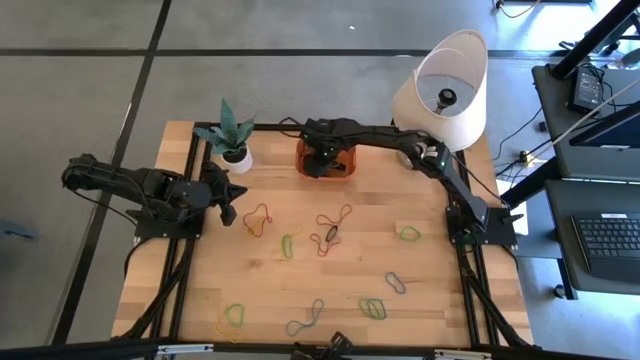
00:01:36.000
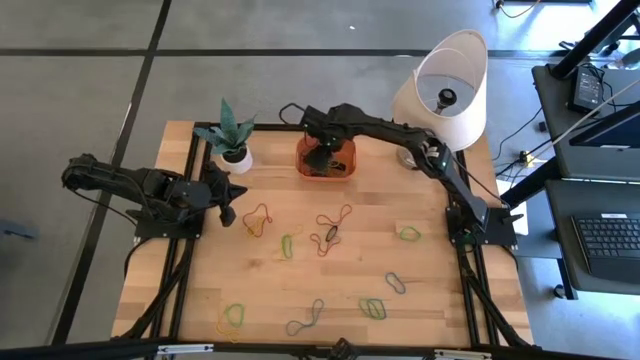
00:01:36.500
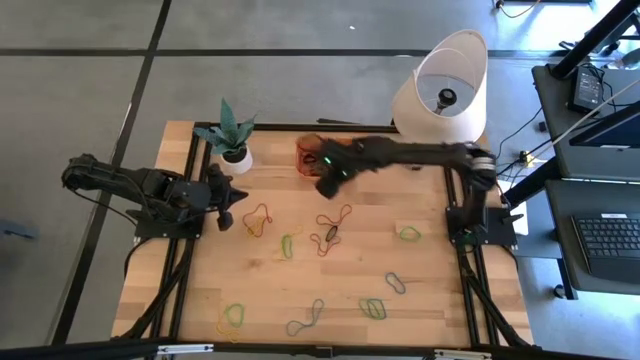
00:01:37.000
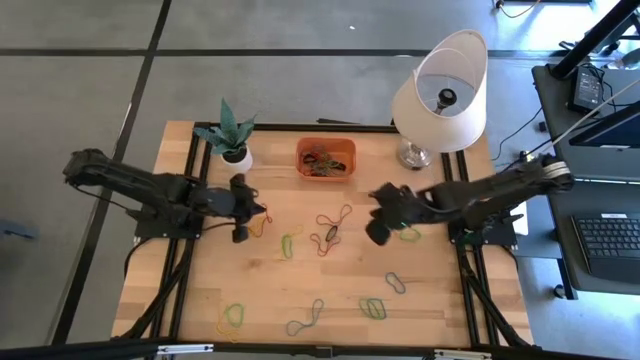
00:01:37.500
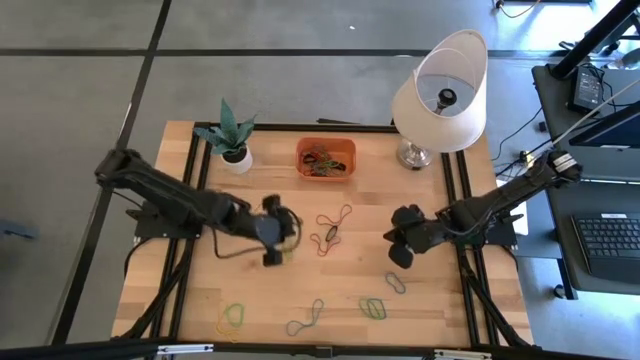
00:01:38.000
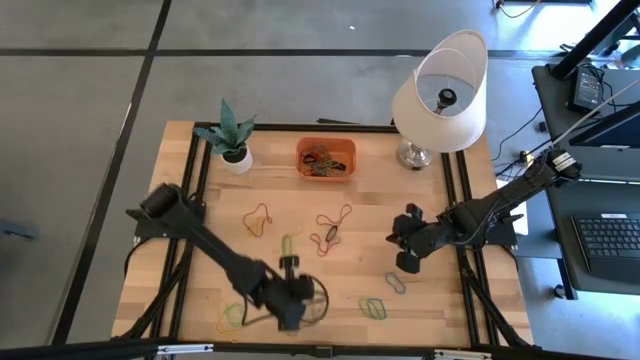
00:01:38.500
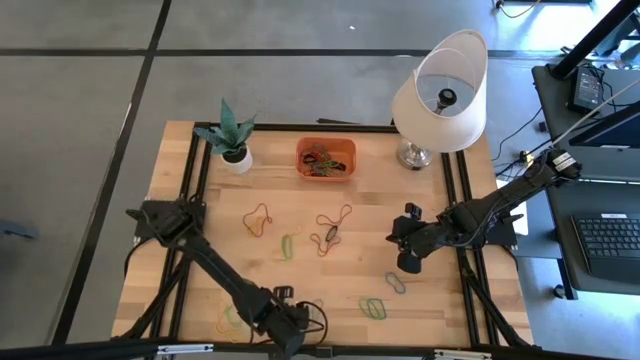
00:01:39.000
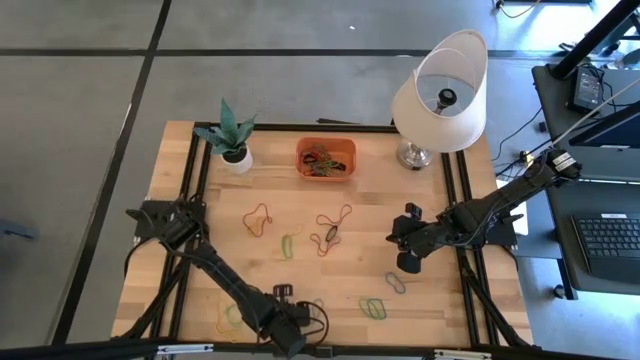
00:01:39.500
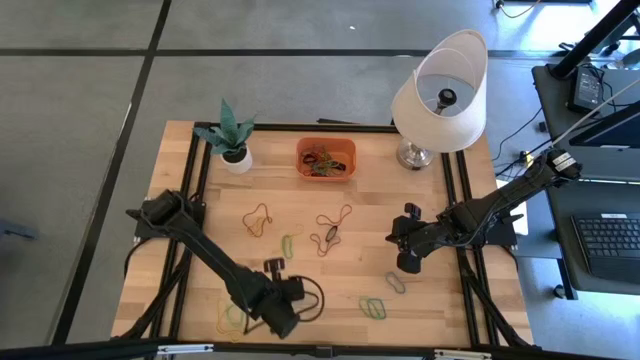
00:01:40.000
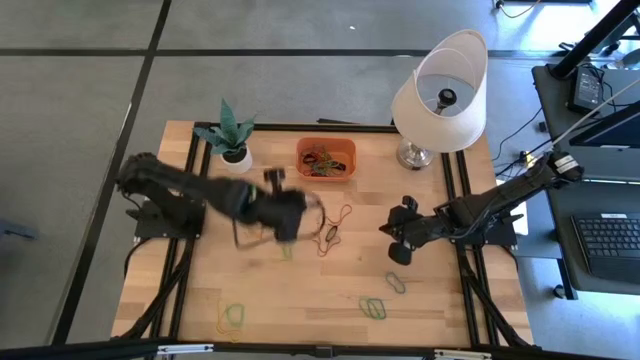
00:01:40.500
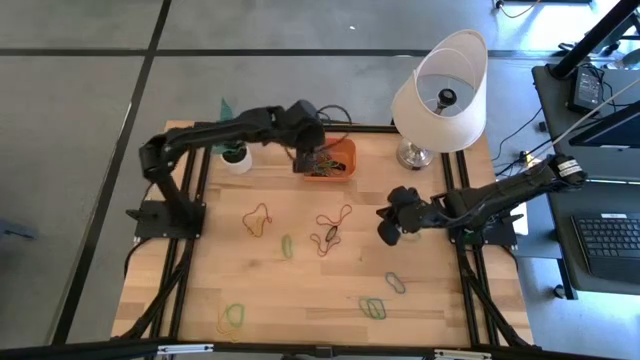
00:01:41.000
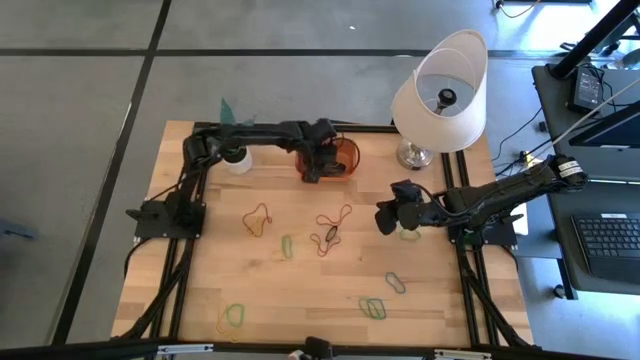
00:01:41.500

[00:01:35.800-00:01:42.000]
Task: Pick and place rubber bands into bin
Put the left blue rubber band into the orange bin

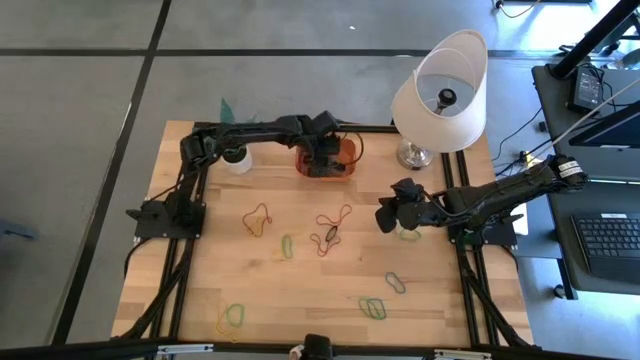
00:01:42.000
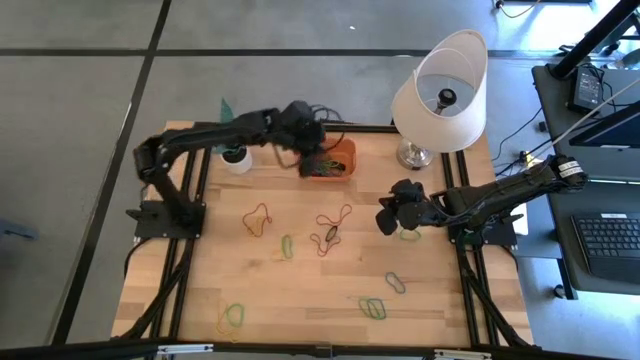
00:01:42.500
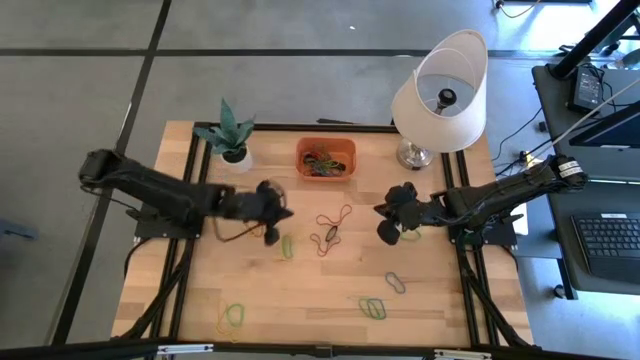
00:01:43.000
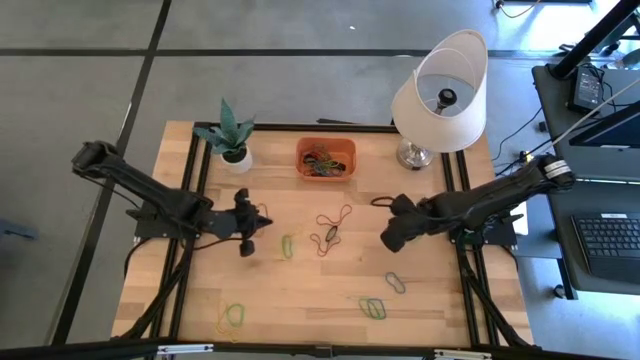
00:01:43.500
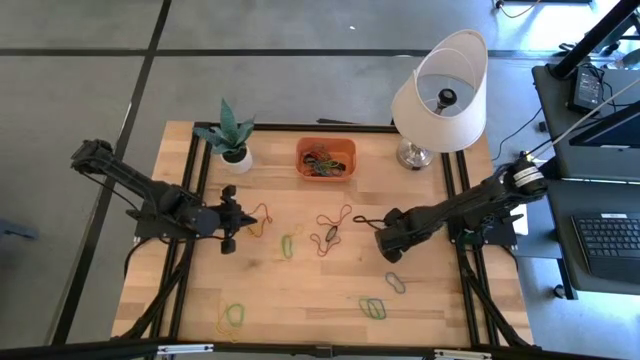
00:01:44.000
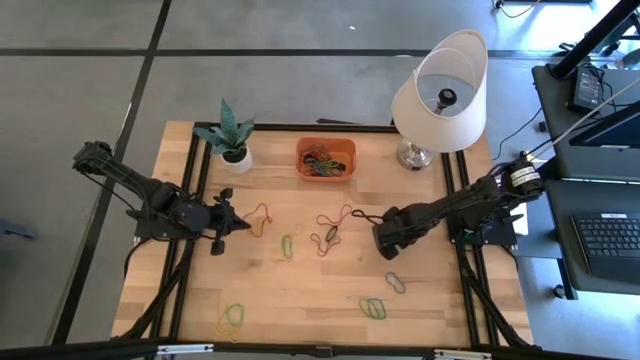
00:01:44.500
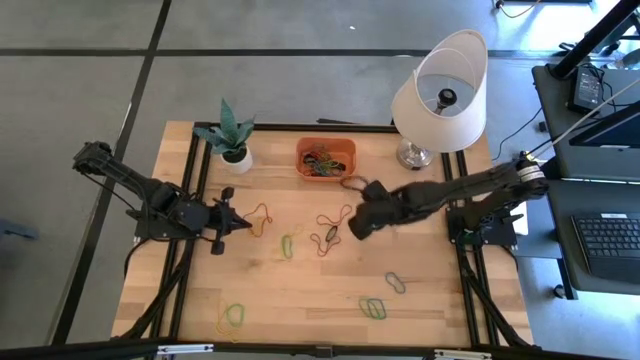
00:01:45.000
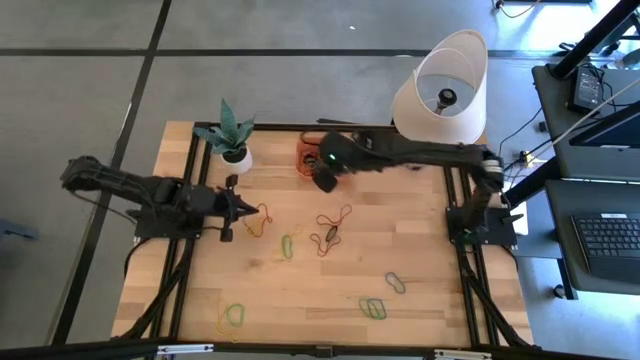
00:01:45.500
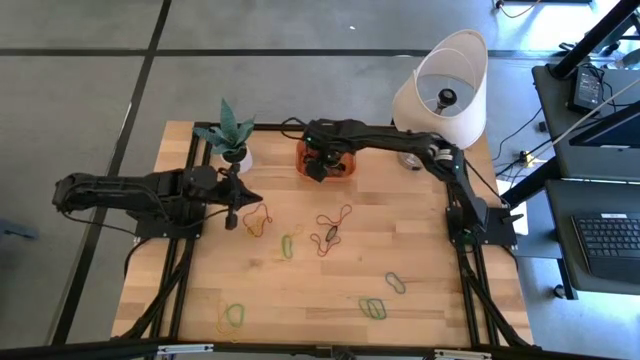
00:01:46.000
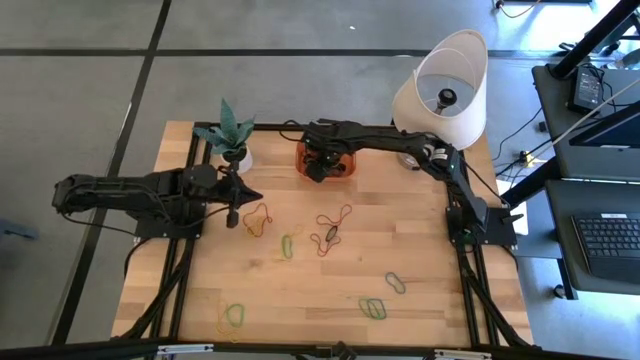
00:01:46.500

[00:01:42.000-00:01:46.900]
Put the green rubber band into the orange bin

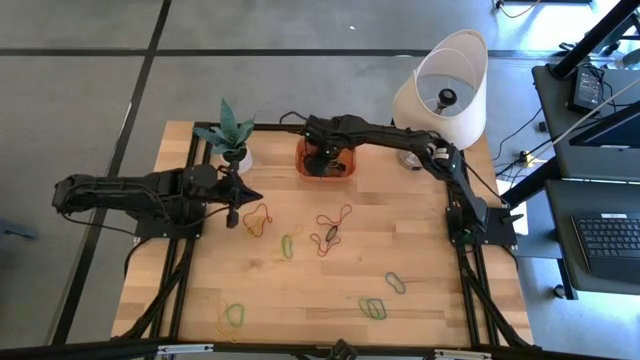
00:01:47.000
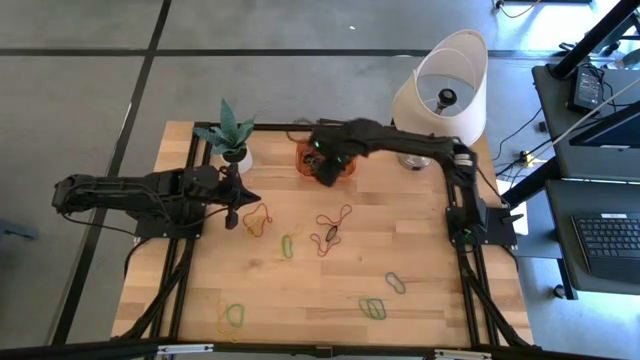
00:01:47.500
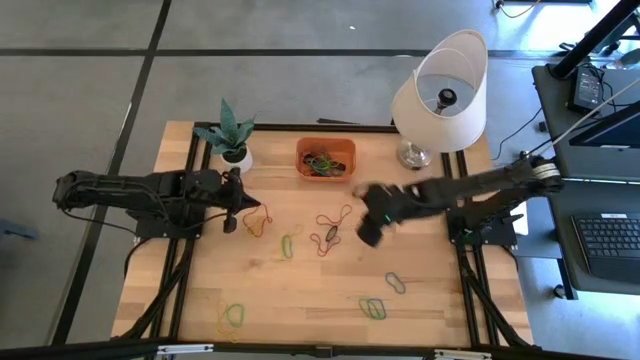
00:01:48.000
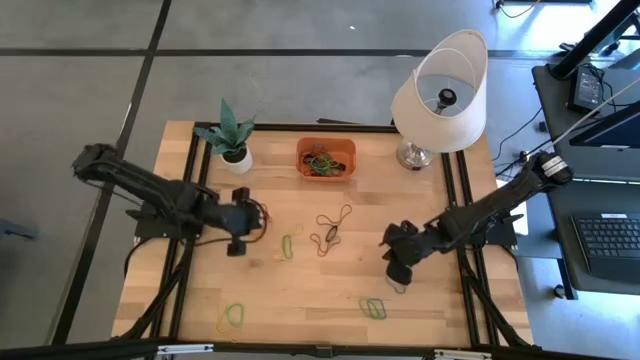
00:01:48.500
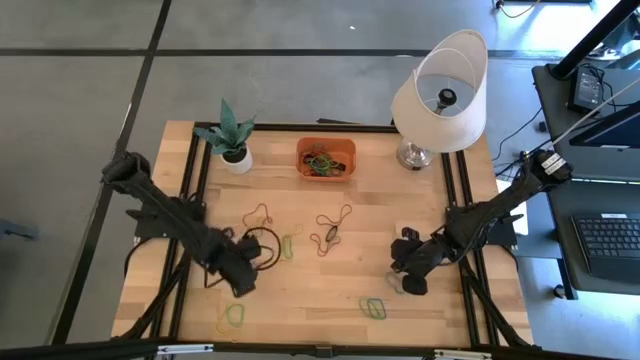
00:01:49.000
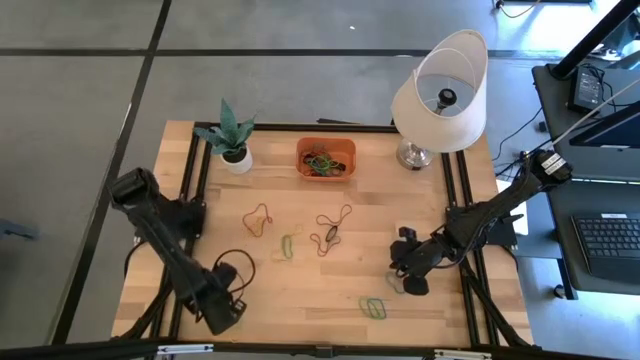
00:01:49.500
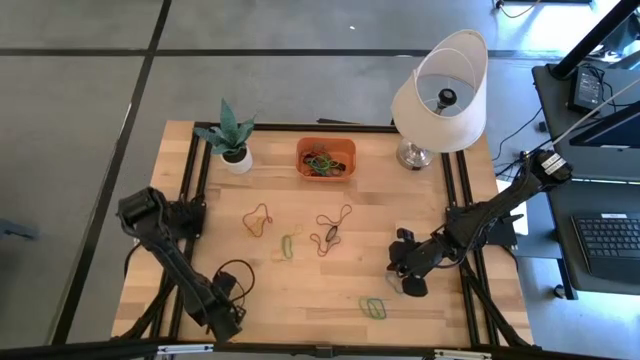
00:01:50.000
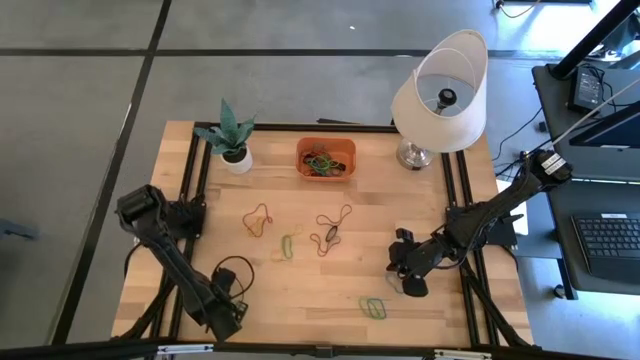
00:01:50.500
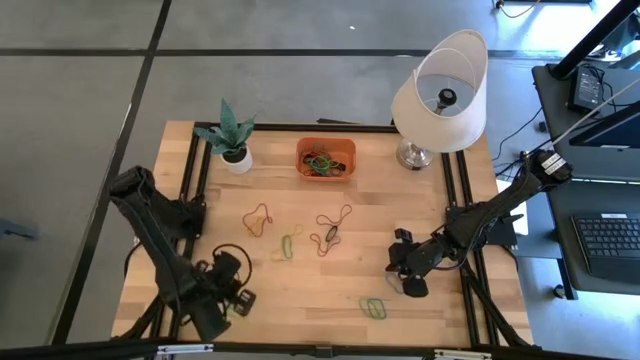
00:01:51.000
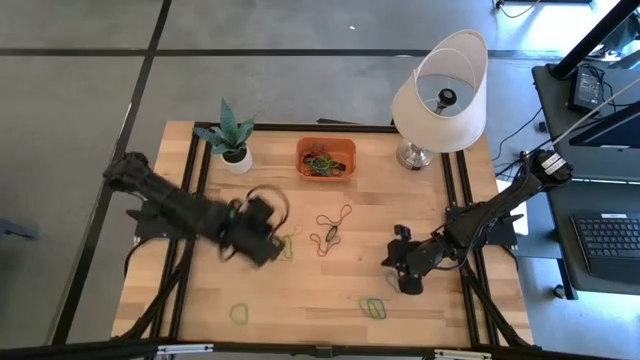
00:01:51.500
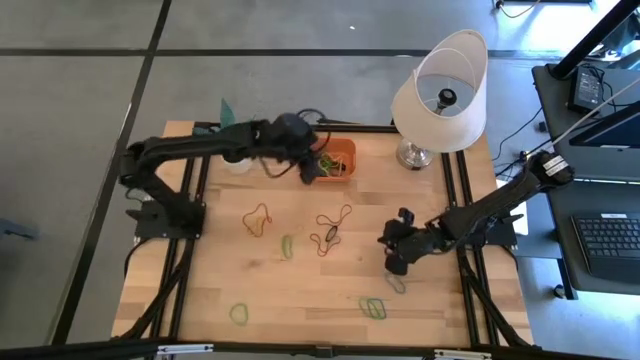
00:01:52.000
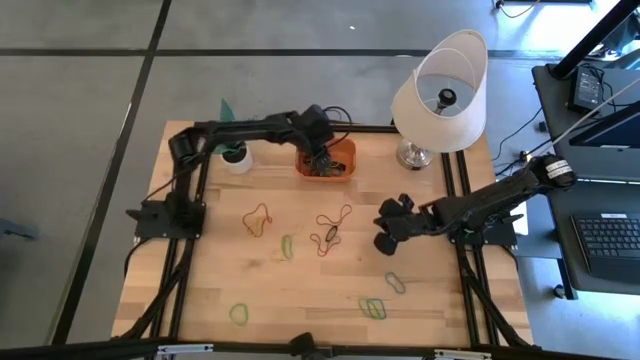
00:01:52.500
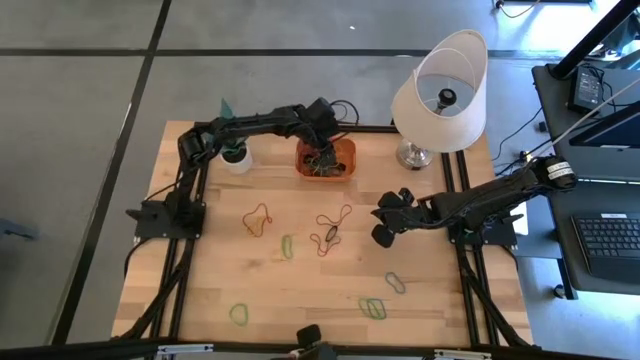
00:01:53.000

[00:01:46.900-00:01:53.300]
Put the bottom yellow rubber band into the orange bin

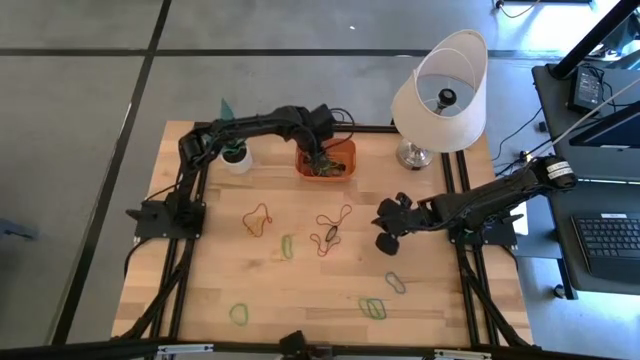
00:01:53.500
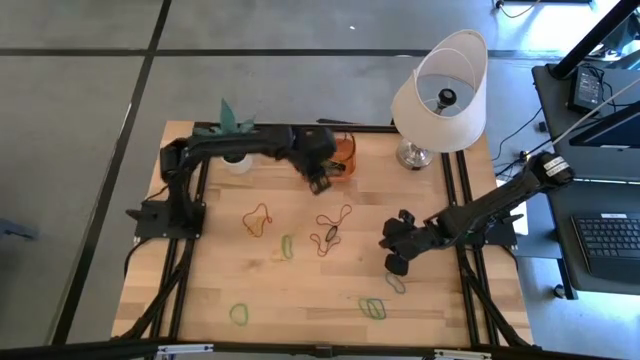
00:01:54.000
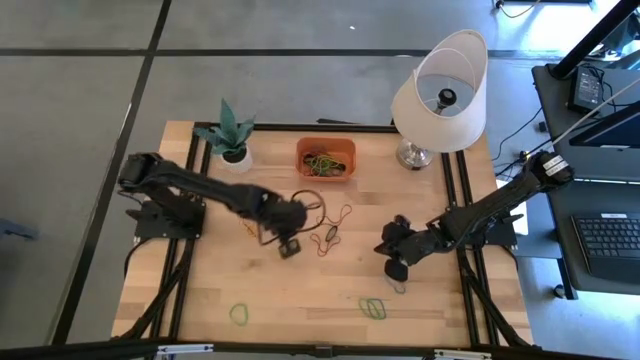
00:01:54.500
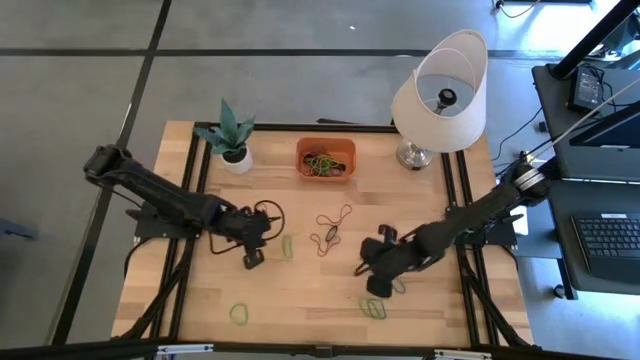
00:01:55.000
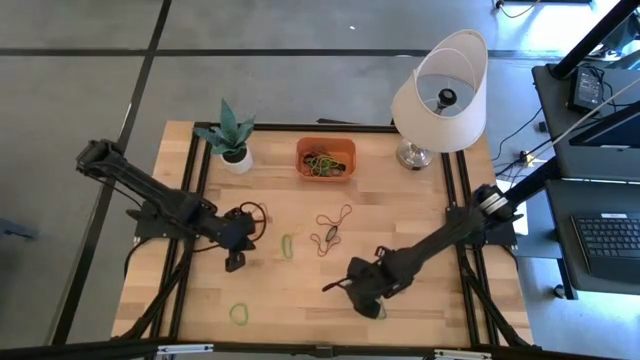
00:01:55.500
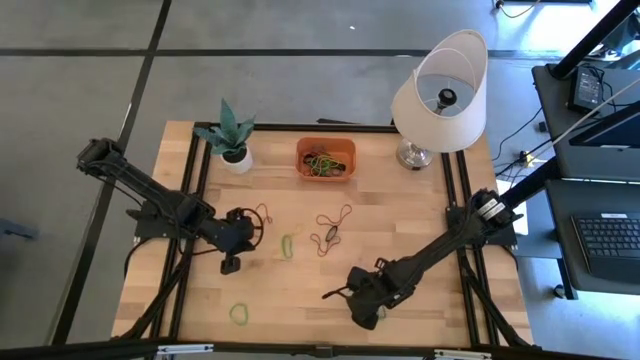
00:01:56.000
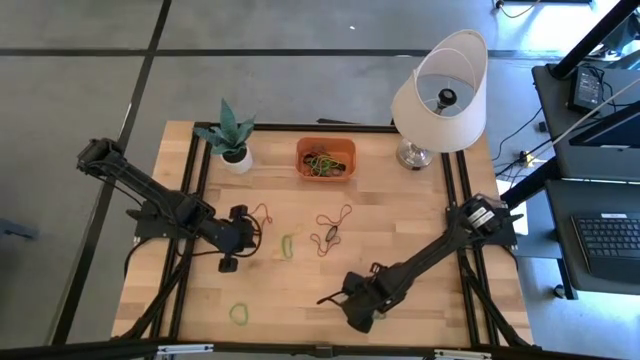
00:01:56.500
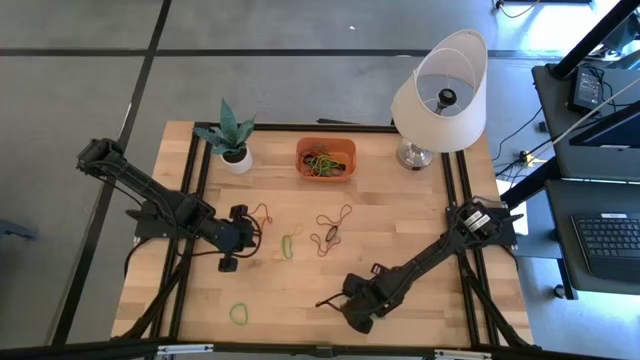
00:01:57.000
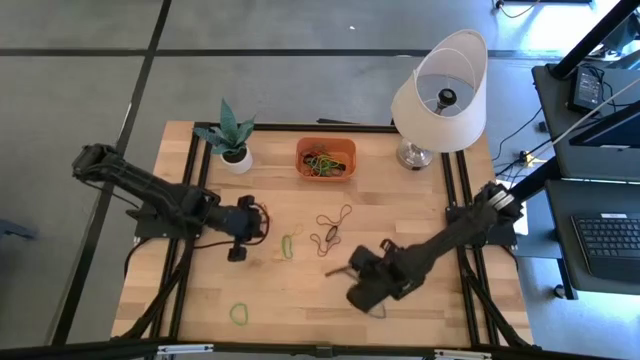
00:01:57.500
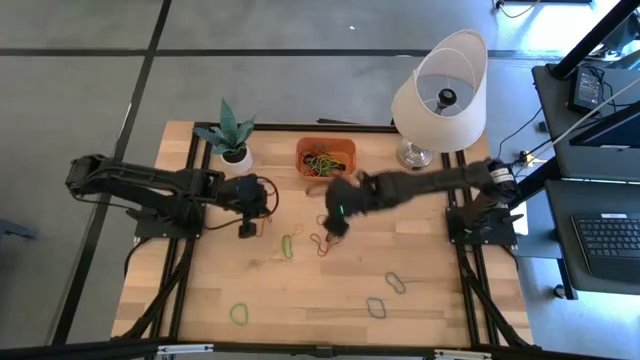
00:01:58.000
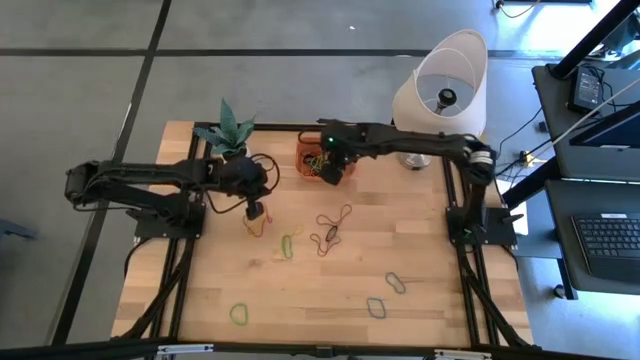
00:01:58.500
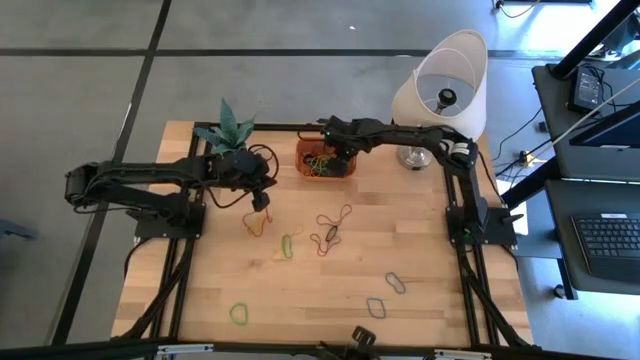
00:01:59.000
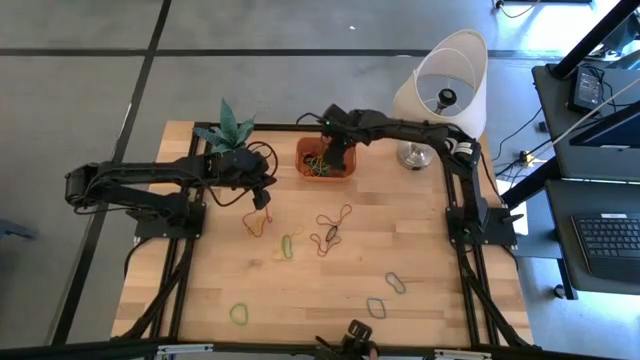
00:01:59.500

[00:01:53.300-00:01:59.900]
Put the right green rubber band into the orange bin
